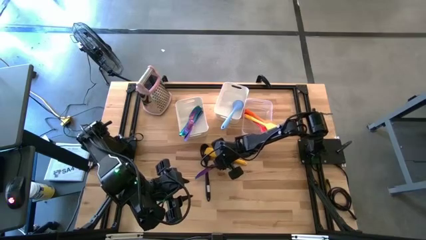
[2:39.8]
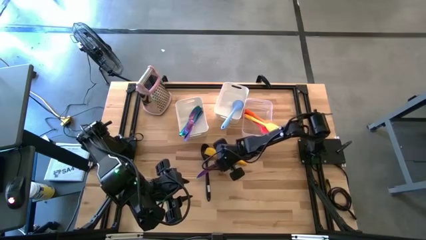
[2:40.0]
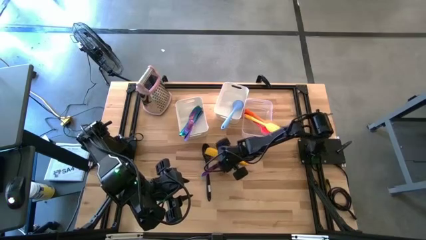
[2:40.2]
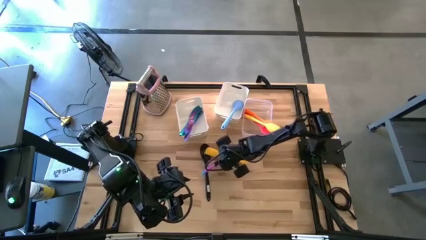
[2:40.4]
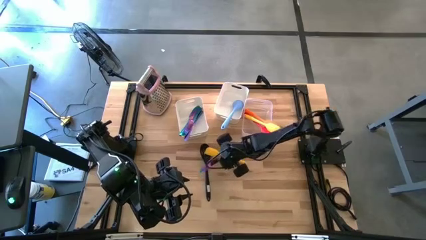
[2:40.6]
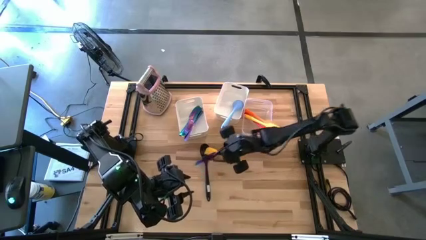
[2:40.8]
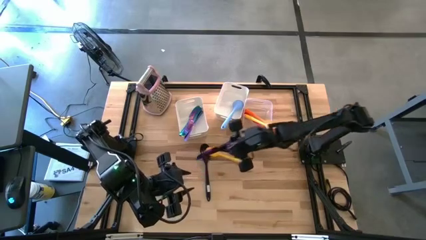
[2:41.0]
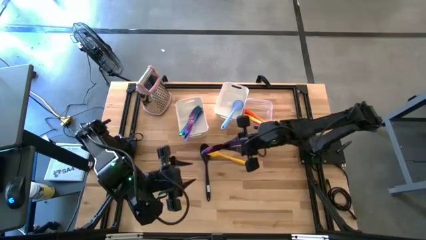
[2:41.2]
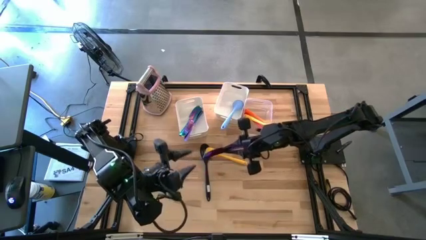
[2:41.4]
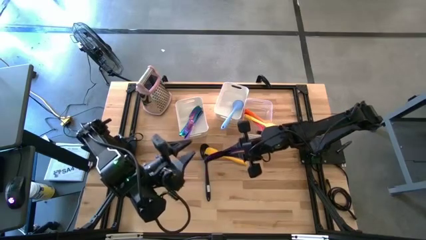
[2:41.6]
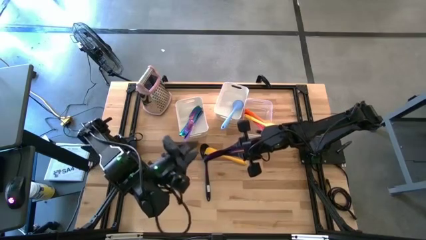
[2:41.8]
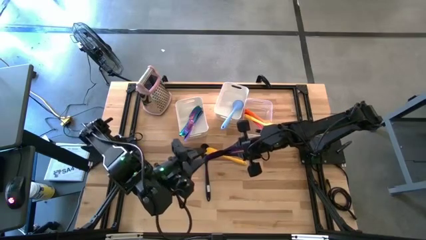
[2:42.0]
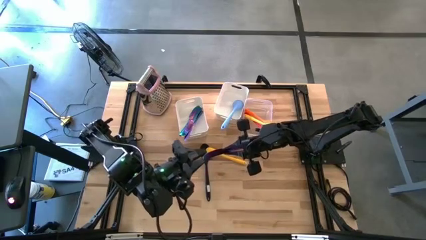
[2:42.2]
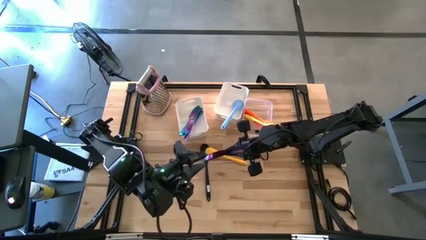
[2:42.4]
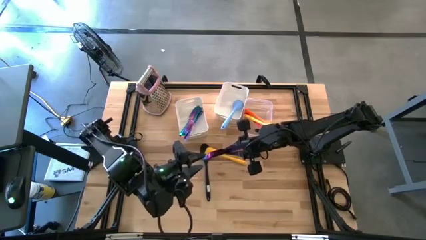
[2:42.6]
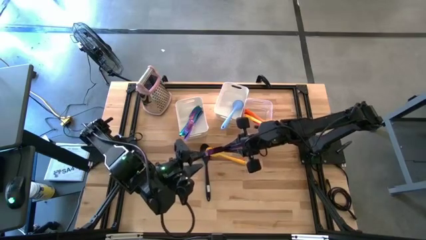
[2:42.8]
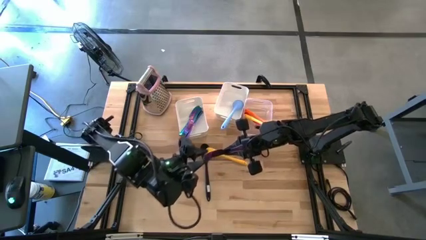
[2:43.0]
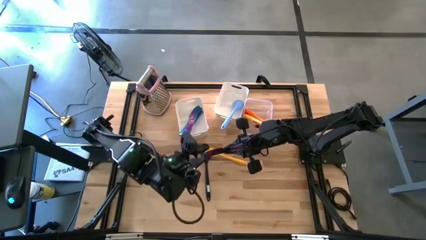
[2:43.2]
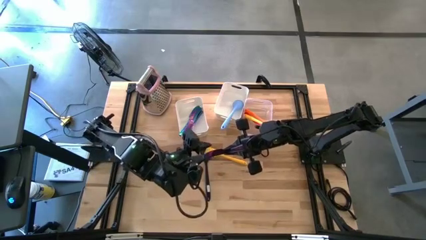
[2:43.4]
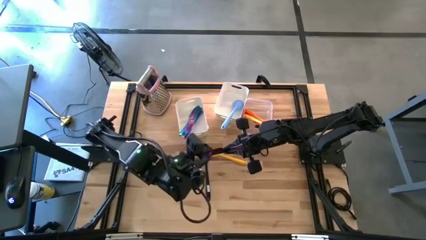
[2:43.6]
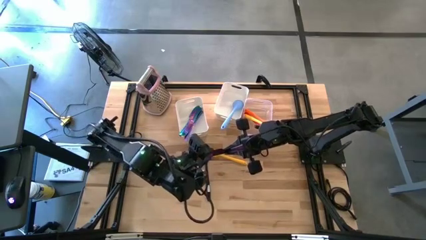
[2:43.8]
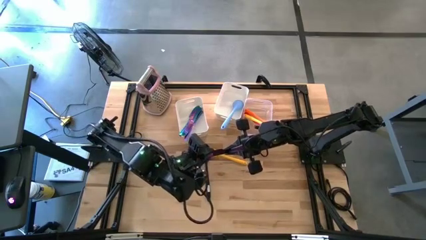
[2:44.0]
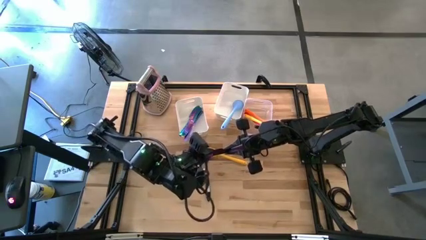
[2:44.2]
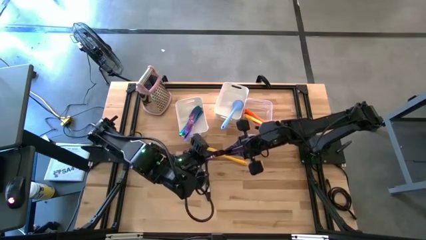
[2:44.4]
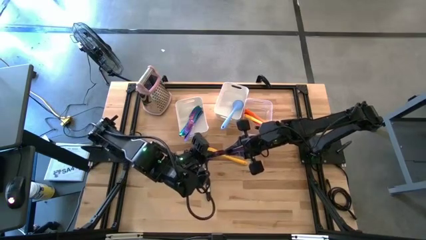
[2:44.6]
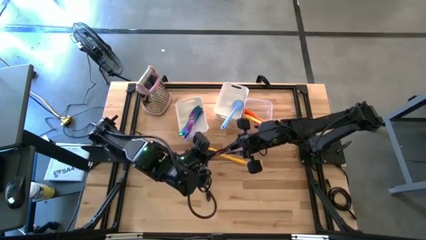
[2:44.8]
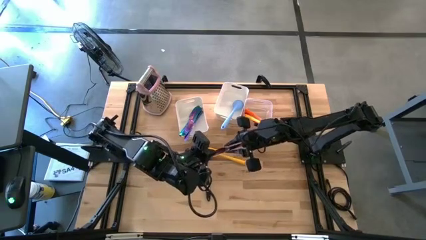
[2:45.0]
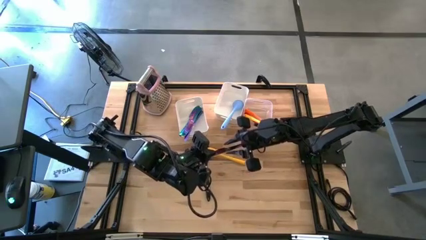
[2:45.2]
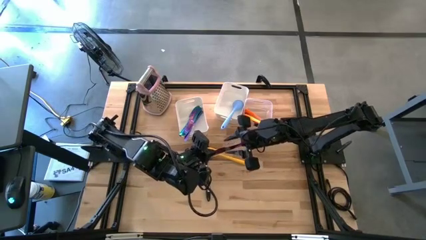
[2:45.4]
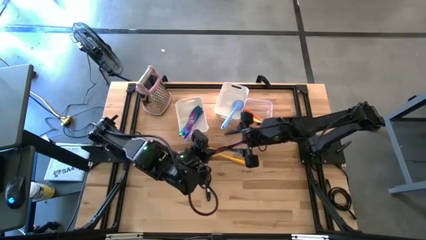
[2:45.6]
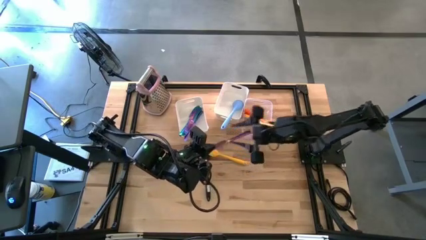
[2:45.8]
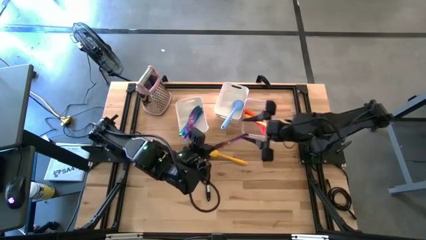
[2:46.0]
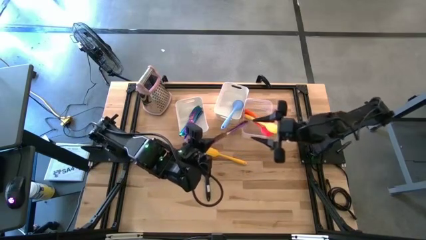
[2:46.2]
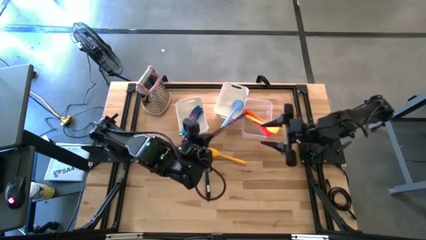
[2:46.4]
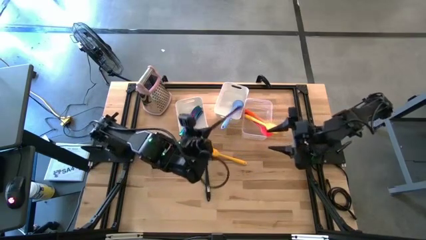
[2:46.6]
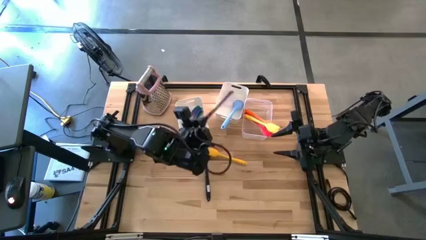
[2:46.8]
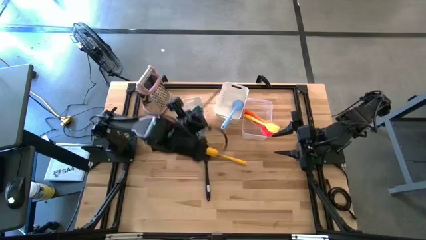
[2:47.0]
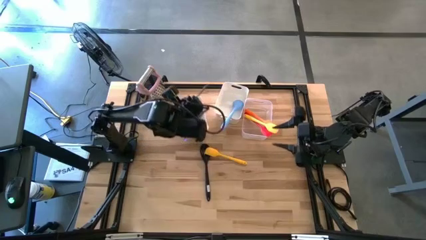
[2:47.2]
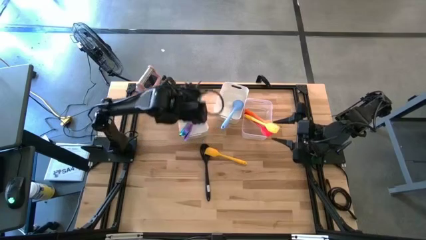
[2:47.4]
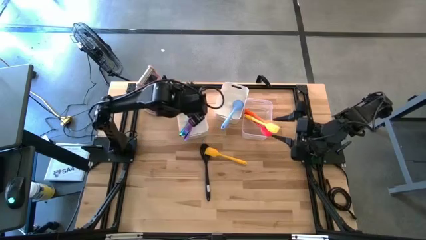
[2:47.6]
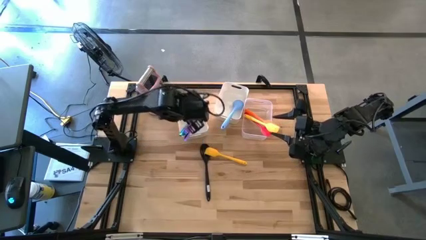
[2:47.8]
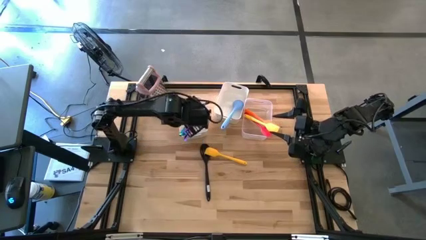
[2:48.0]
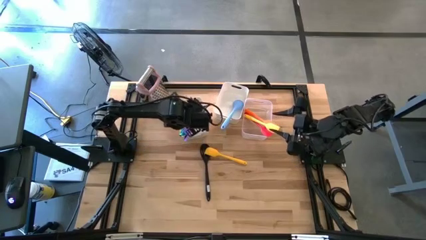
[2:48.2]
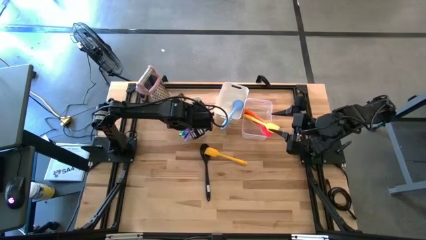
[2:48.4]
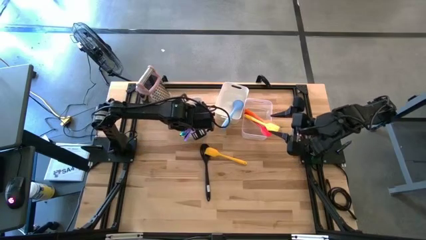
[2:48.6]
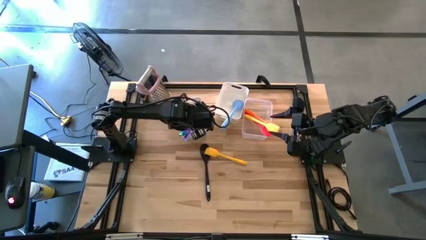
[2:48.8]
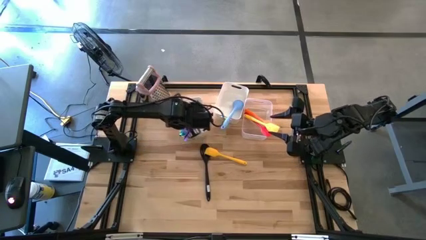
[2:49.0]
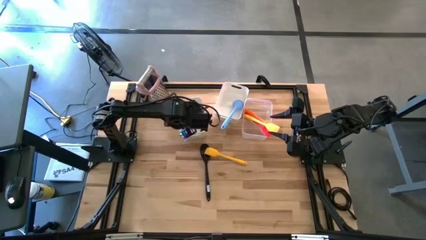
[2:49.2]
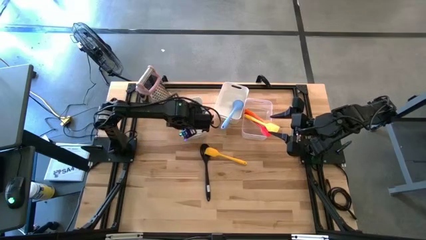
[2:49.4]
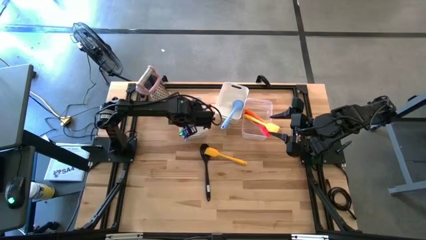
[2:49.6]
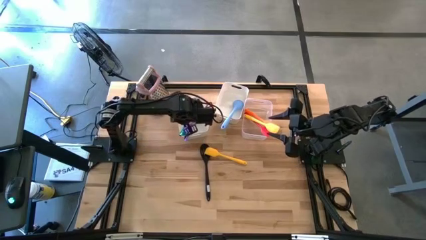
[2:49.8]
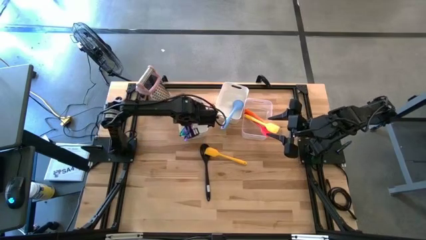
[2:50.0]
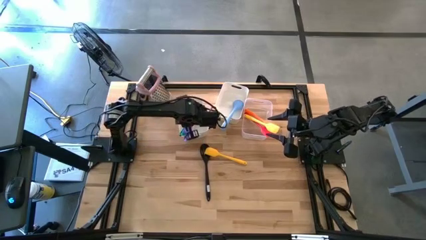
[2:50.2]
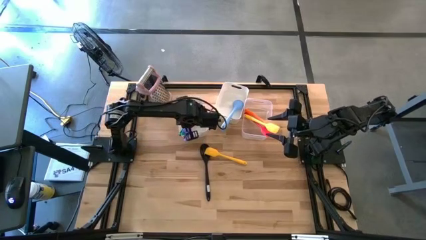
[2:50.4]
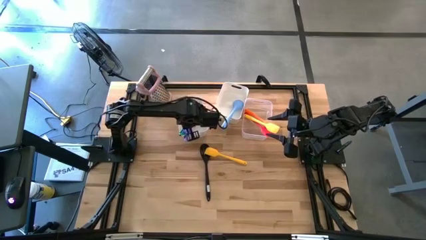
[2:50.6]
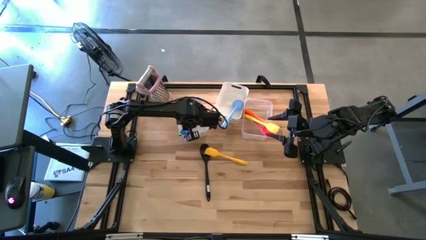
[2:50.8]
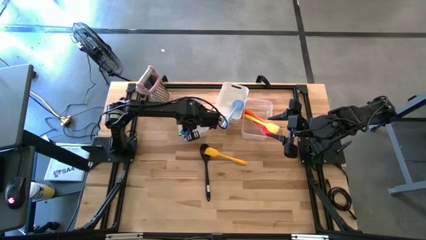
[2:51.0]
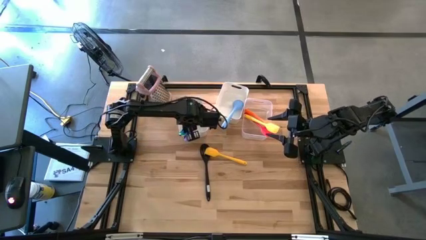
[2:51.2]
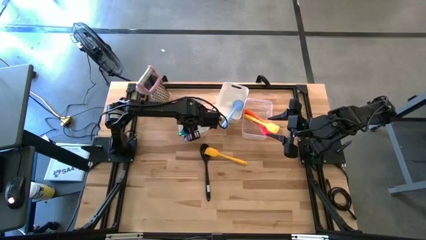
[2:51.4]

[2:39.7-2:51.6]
Task: Pick & Place Kitchen Items
Put the violet table knife into the left white bin
